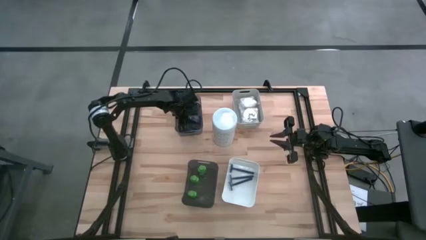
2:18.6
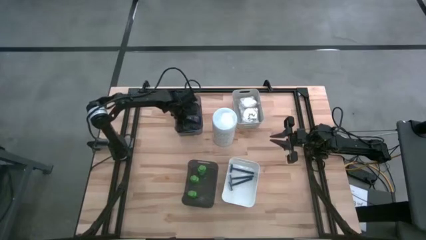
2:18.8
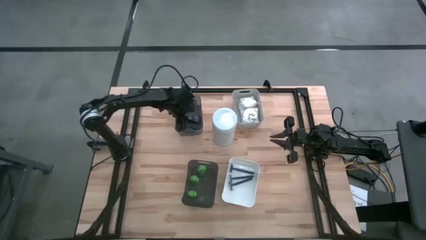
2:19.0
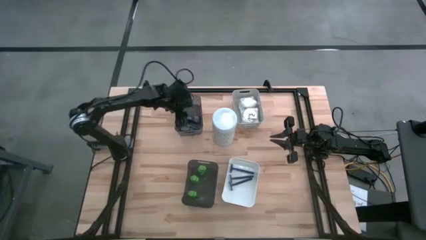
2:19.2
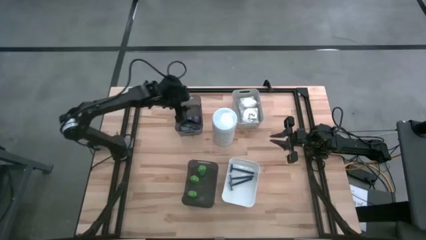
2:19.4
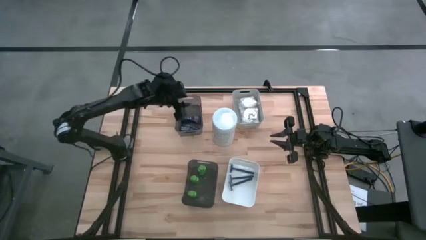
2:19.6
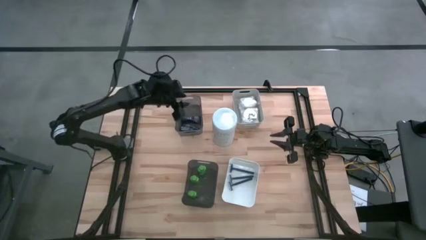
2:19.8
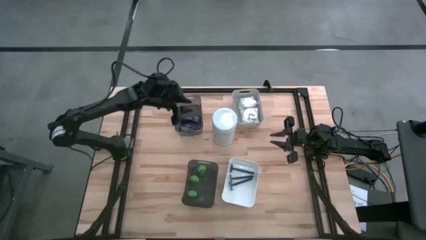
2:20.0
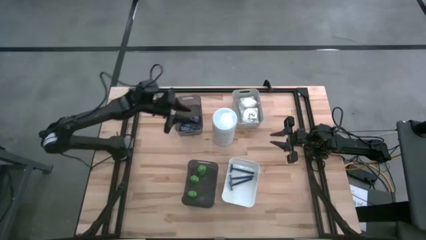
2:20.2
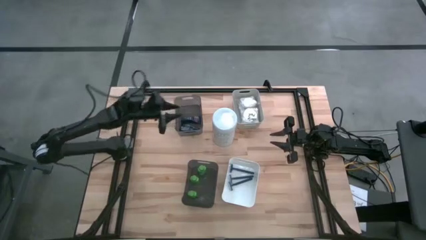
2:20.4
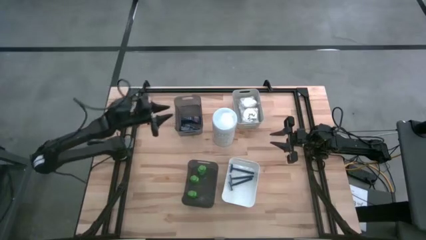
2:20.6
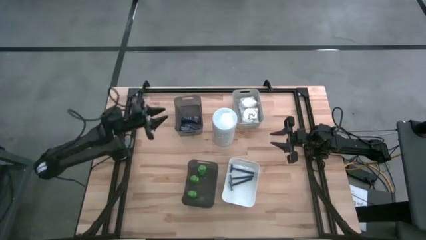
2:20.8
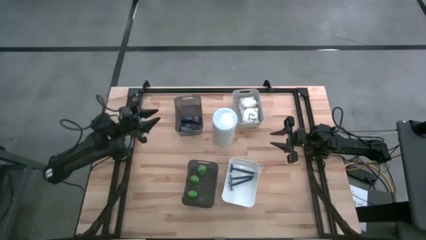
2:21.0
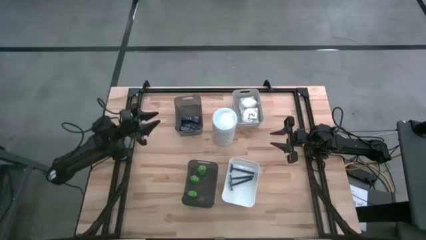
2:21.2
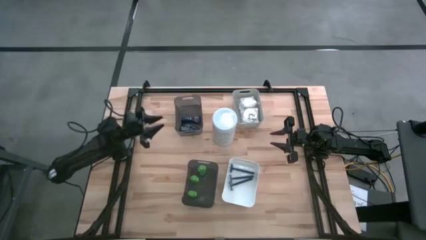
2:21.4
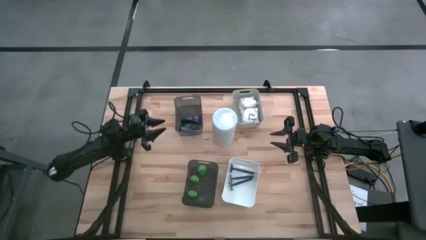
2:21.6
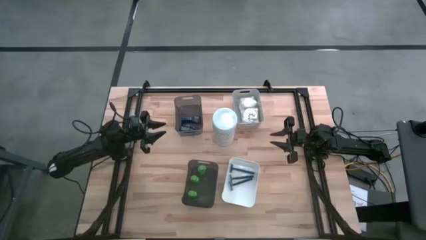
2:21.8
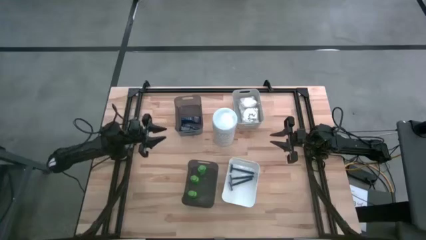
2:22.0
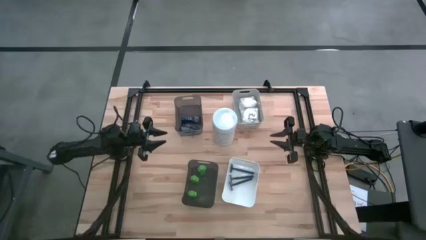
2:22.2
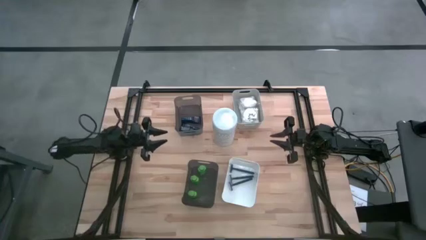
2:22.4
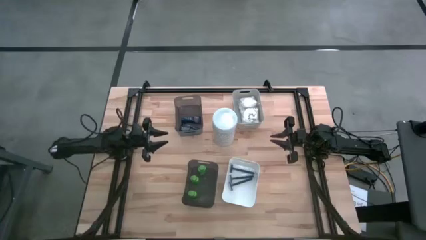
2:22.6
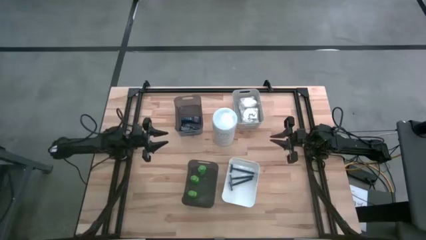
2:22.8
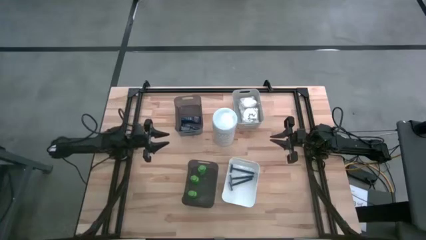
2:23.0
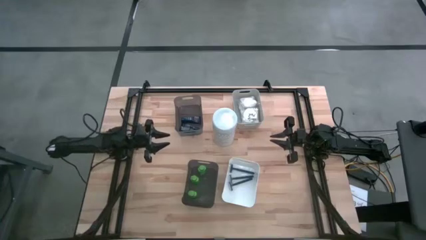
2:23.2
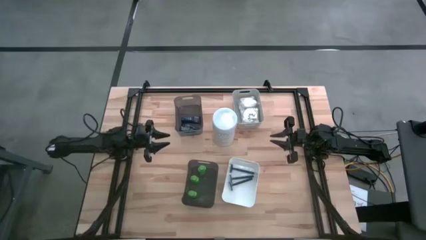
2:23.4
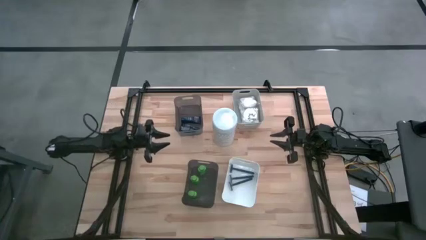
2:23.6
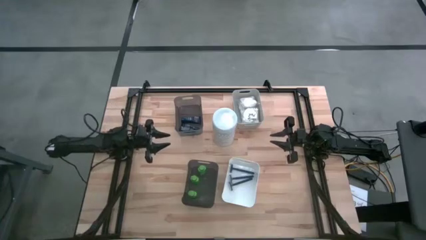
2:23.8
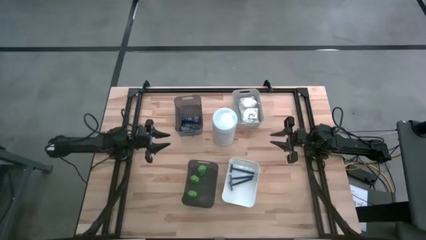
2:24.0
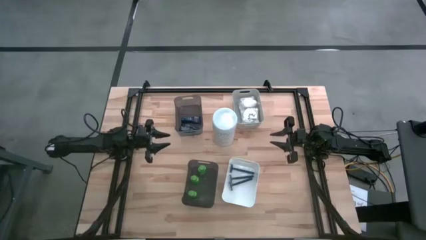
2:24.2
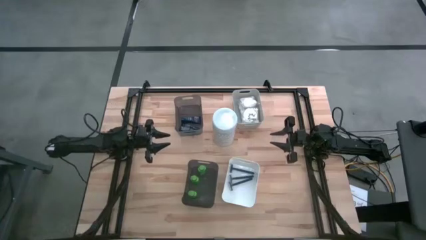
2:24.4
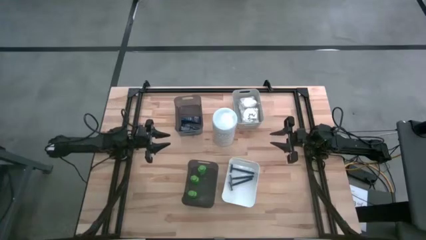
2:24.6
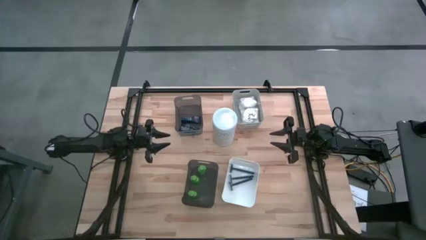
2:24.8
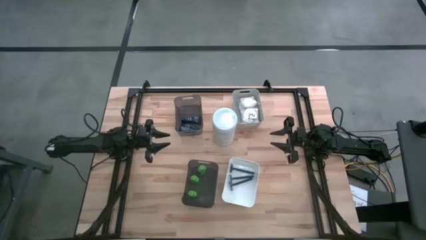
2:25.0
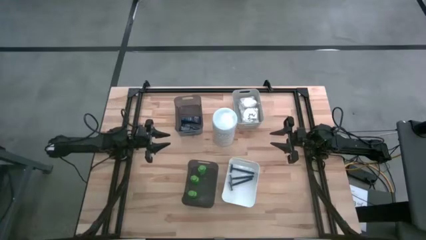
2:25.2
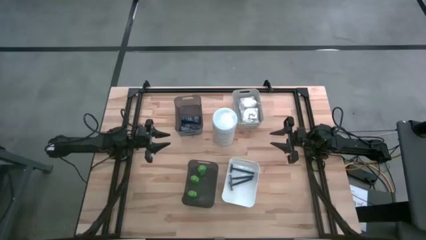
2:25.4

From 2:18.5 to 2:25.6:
Task: Pick & Place Travel size toiletries
Return to home position

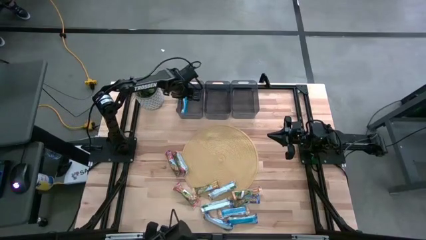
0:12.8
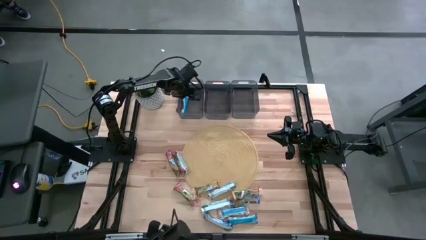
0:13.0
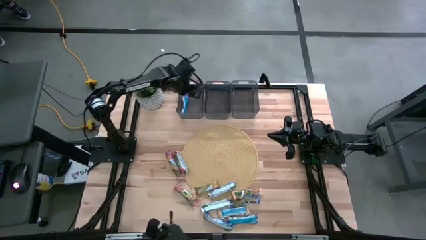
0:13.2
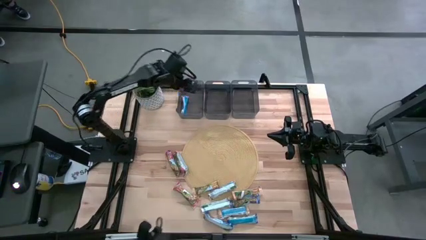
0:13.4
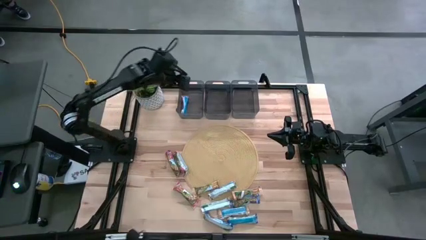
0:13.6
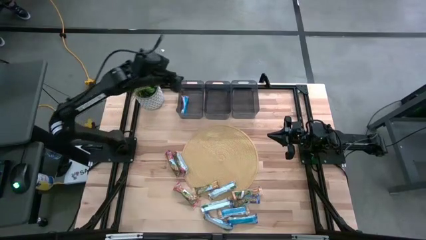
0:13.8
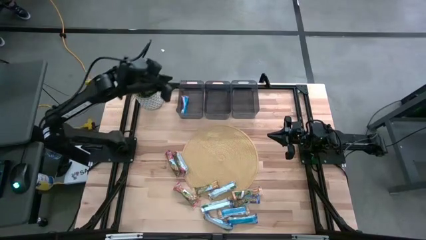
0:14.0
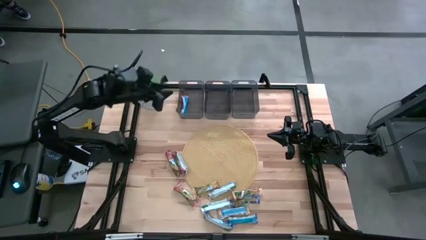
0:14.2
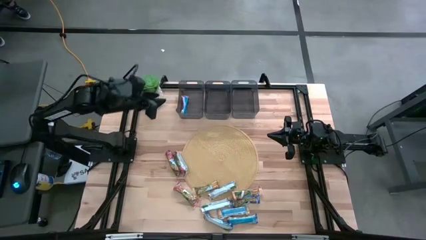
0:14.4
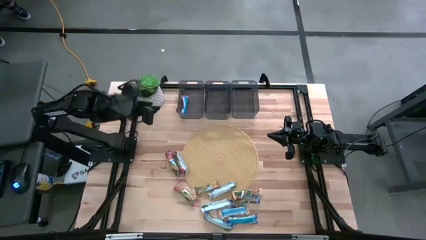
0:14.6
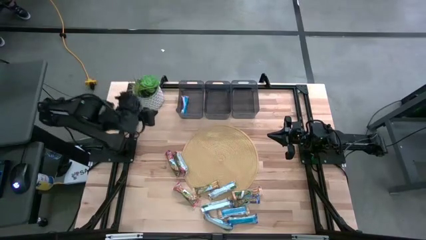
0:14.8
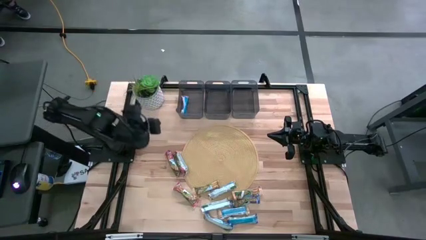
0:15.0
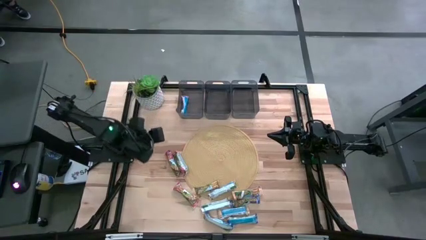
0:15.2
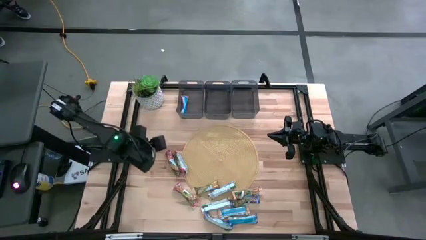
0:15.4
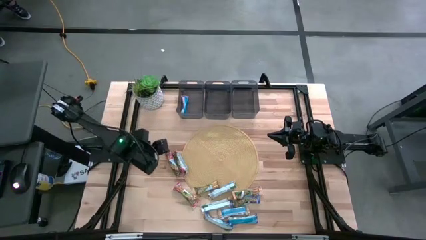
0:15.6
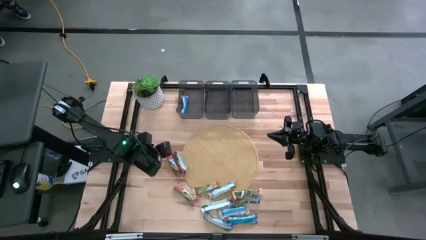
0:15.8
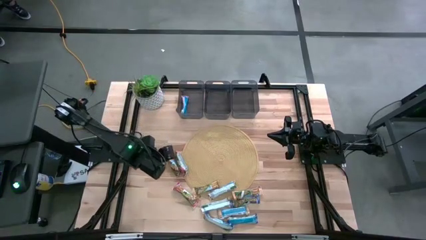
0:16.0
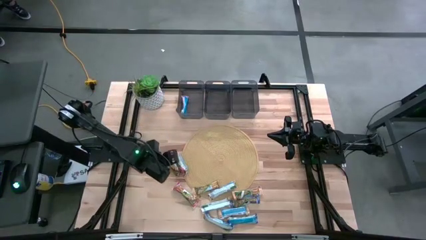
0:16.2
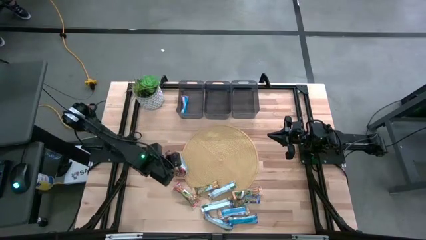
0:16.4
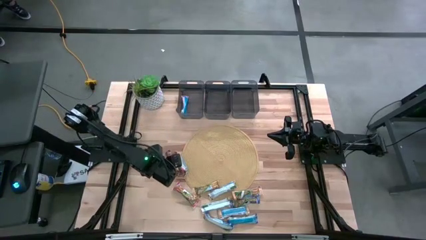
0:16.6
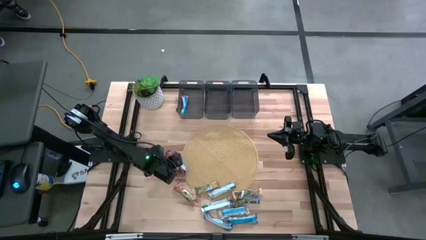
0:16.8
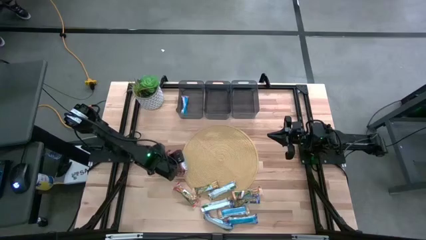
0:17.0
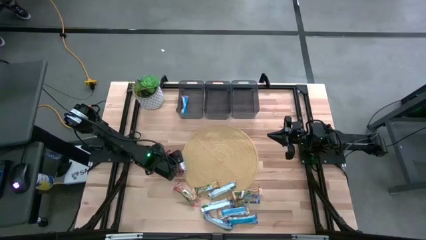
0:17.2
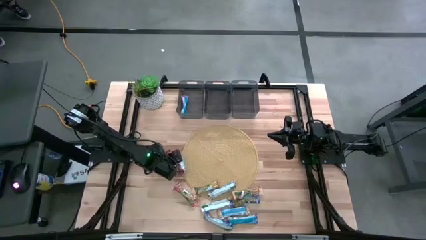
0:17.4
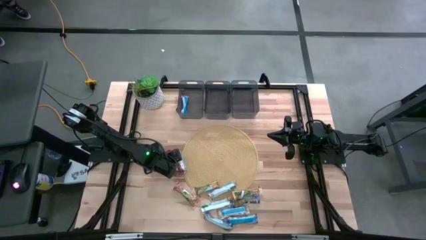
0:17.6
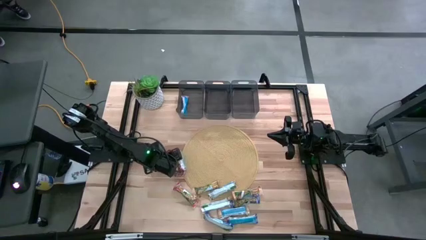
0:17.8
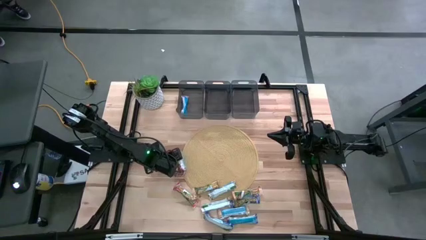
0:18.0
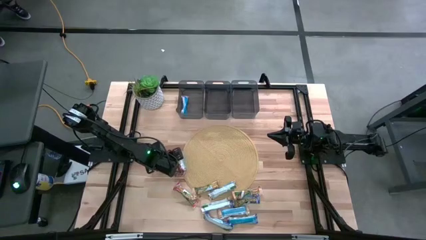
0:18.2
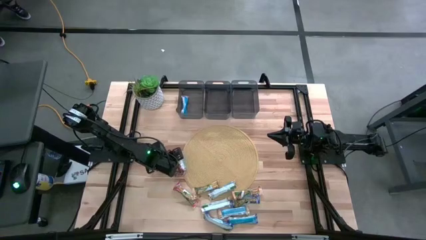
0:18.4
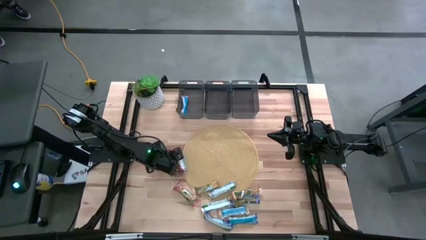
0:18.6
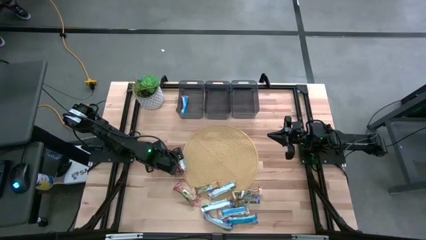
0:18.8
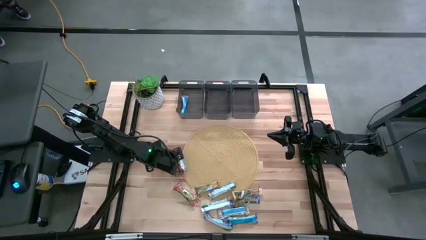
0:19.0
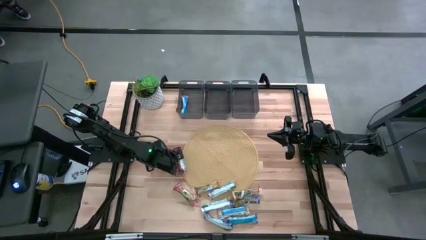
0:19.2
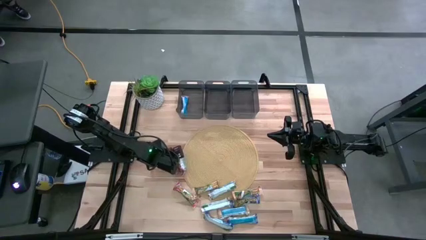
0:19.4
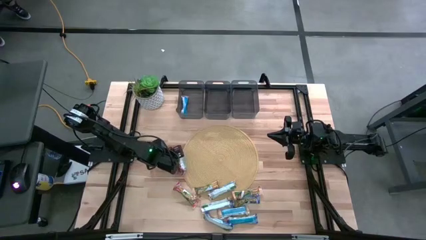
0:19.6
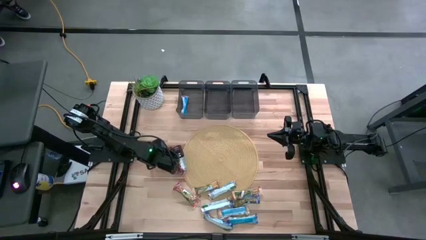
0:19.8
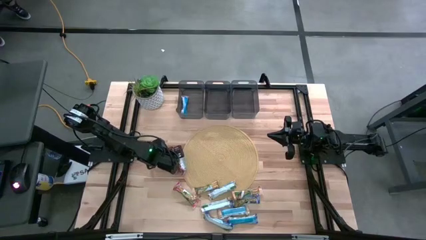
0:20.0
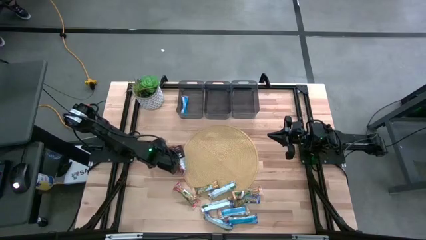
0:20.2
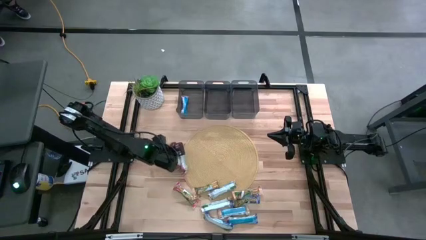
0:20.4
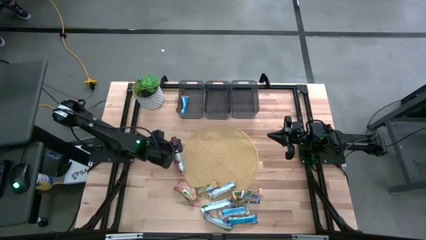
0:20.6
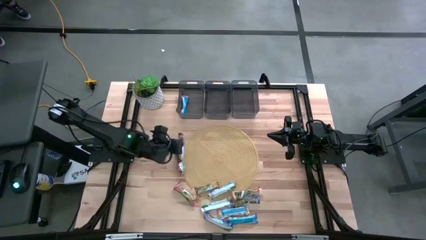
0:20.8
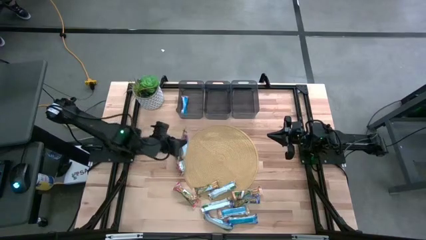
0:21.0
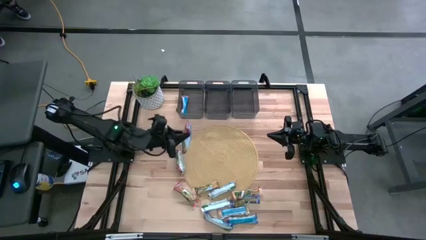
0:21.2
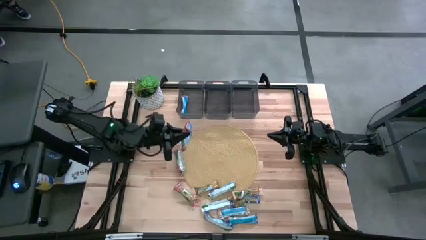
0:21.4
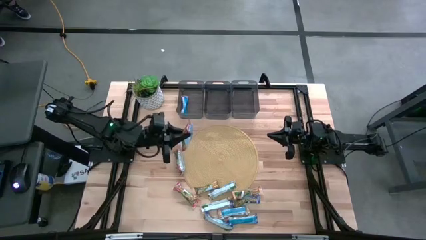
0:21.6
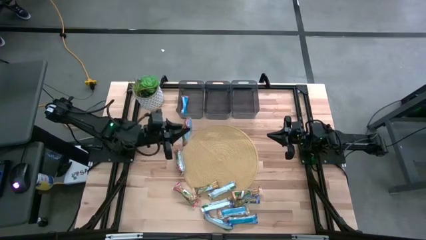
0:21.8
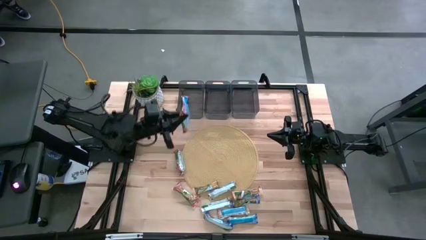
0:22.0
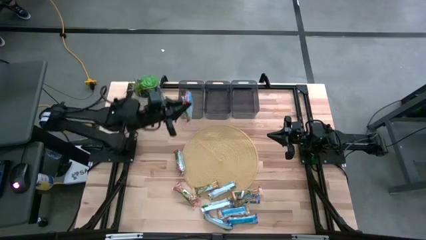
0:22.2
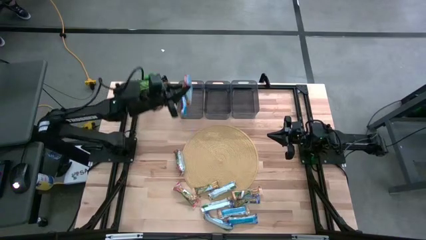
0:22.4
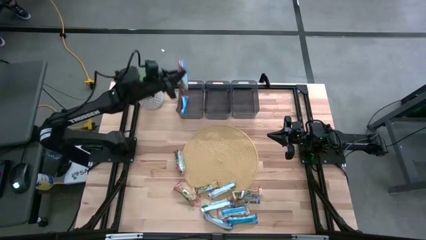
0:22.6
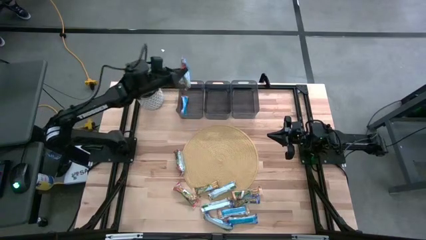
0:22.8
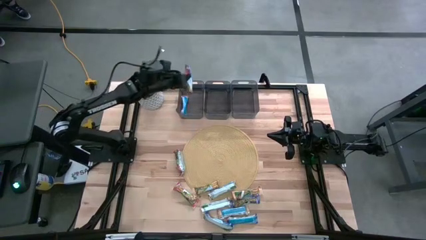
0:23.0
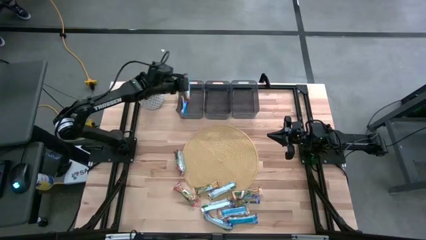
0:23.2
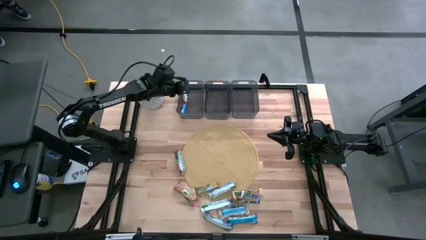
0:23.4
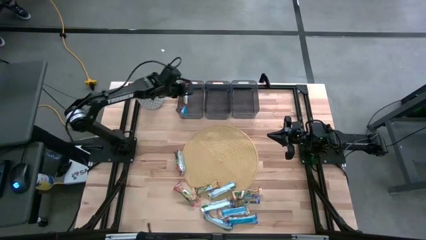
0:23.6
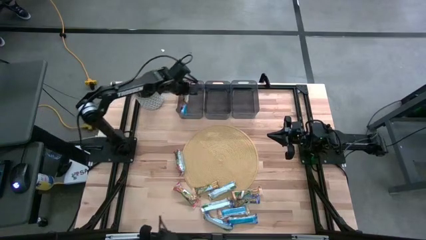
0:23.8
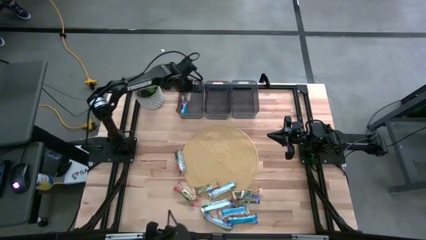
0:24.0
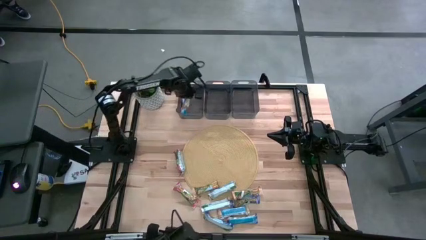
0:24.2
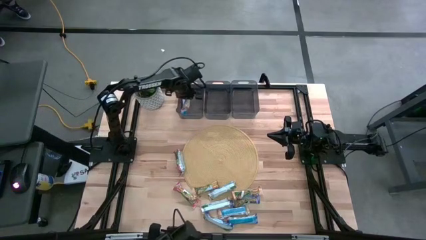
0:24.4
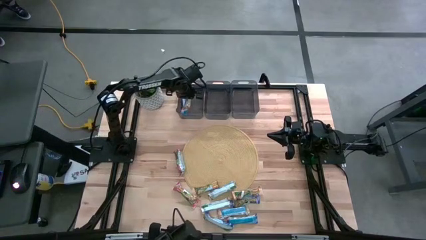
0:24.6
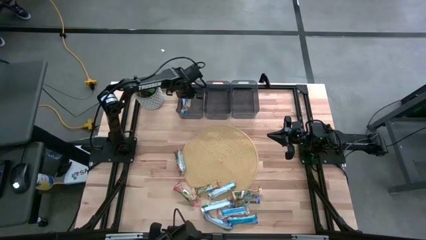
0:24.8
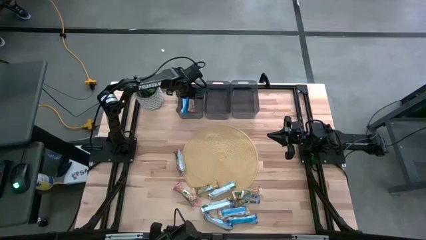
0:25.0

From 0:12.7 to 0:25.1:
Task: Pick and place Granola Bars by type
Put the red granola bar into the left black bin
